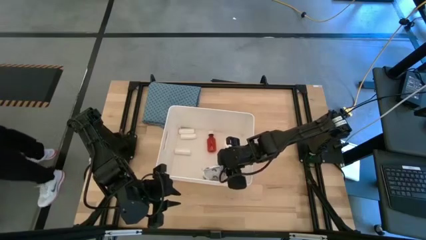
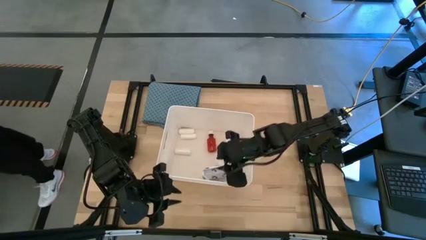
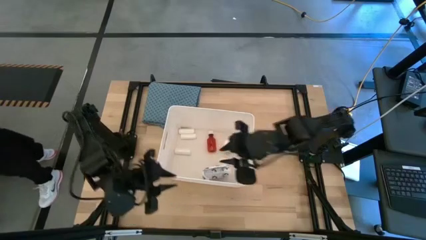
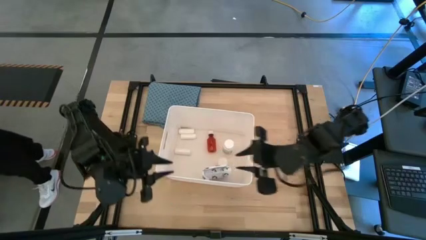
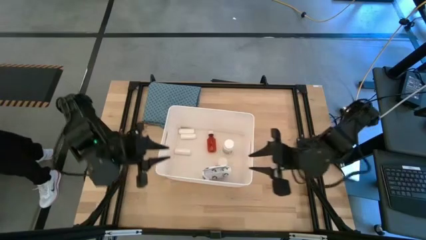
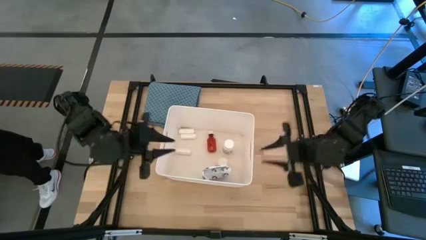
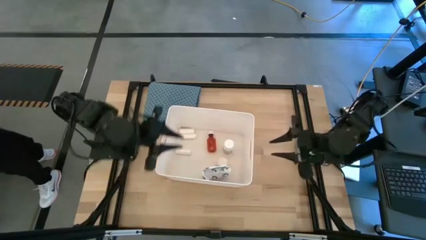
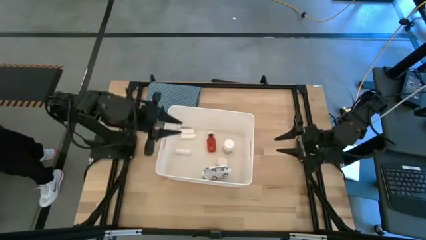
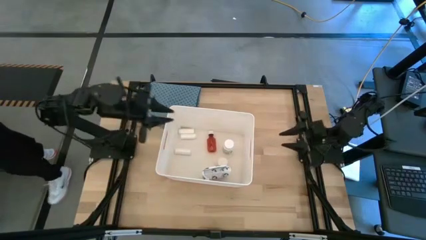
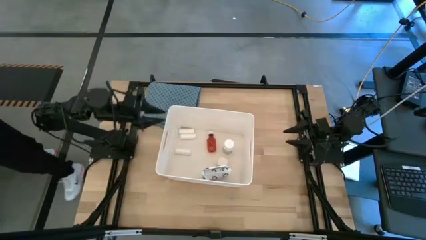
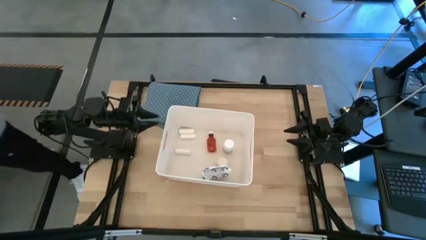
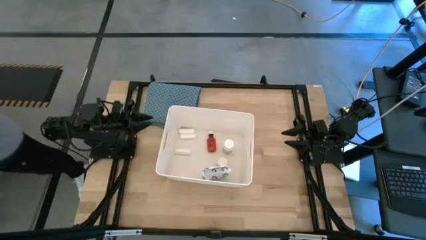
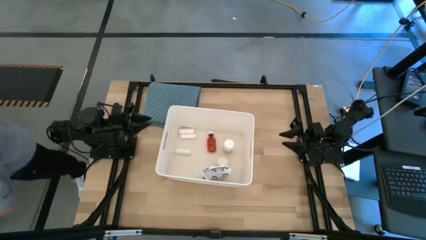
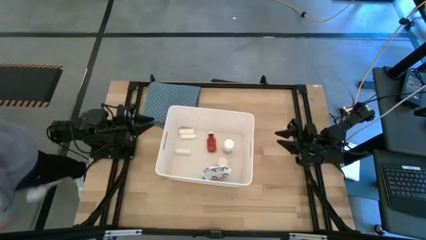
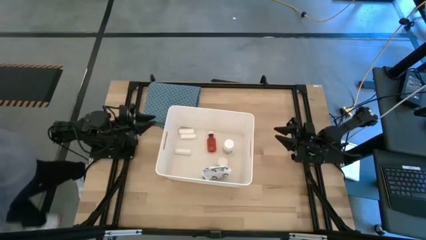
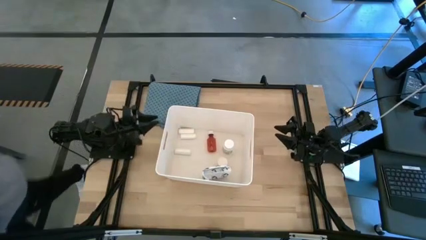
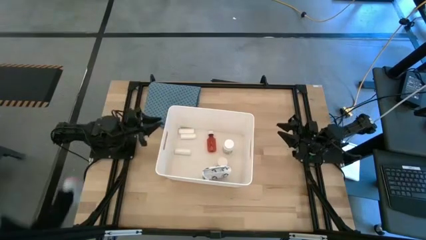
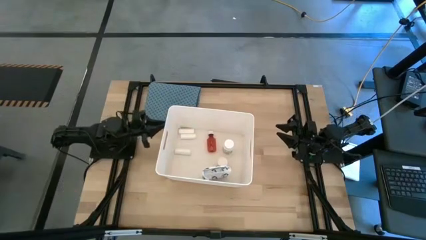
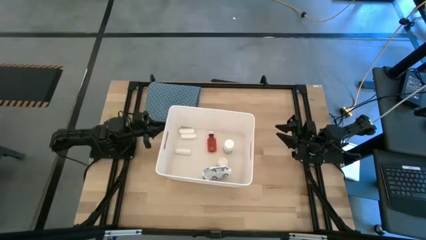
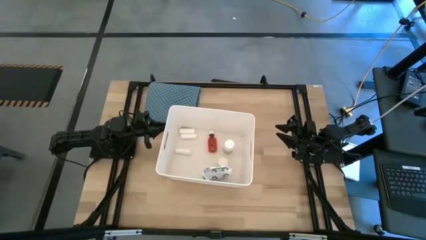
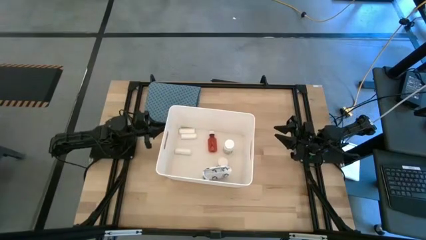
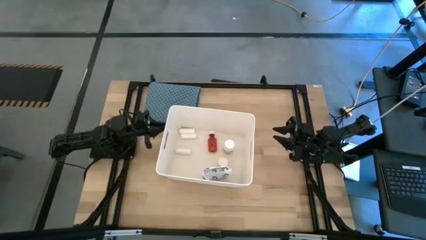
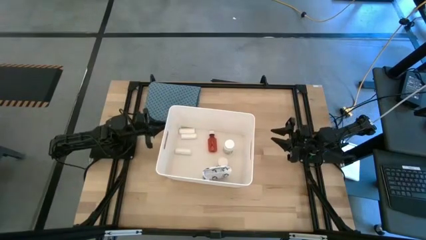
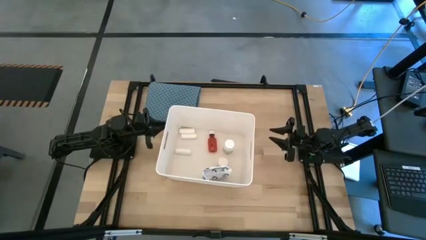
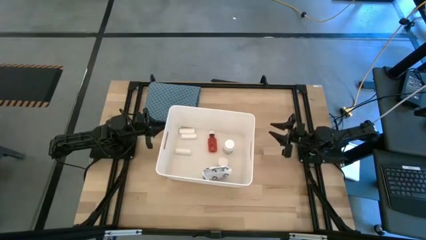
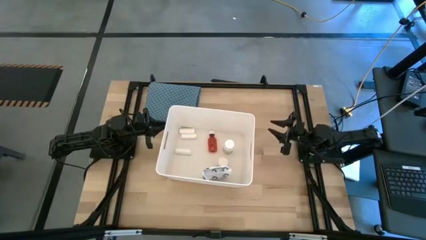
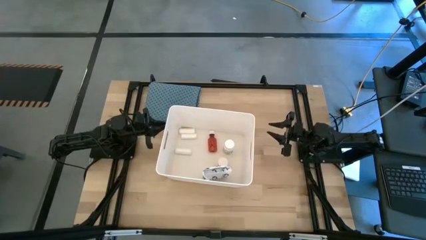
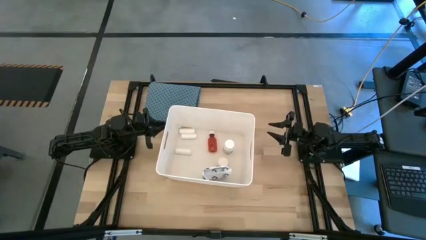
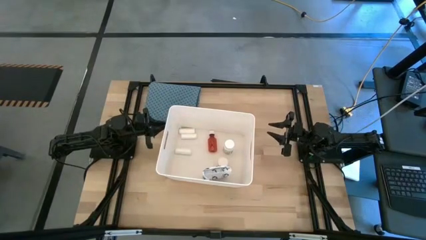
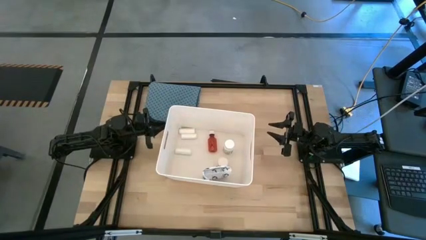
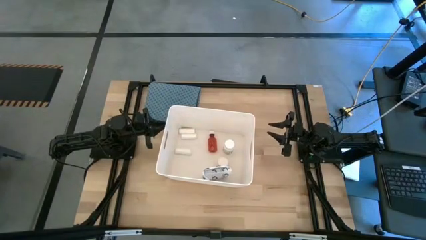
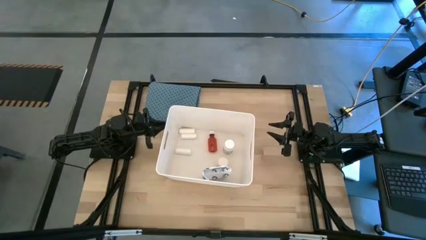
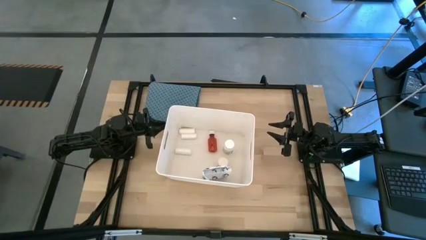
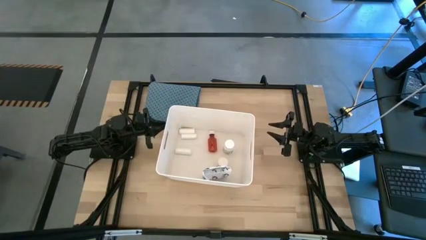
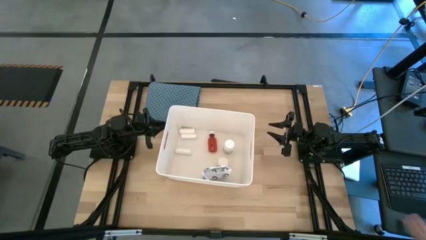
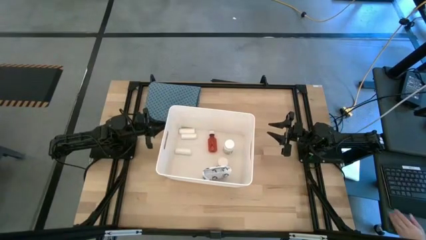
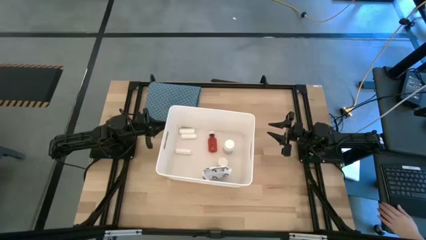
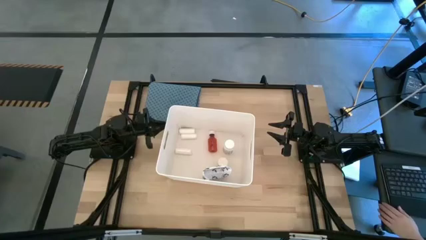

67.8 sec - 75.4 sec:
Task: Pick & place medical supplies in basket/bin
Return to Home Position

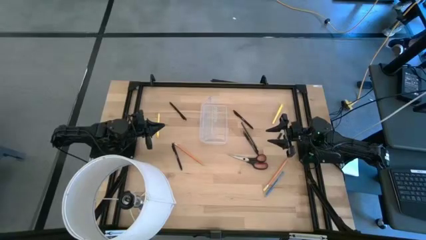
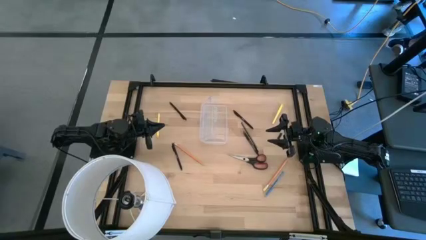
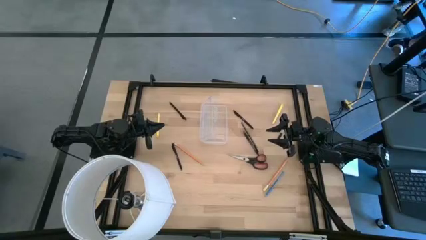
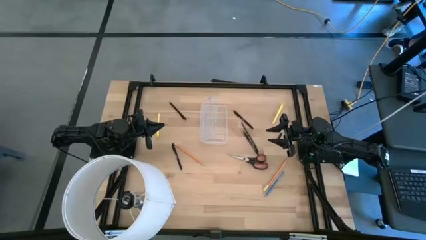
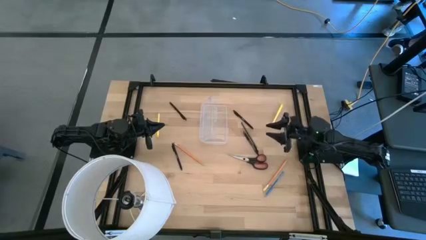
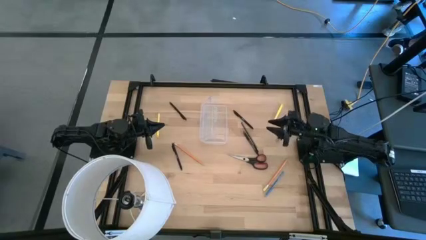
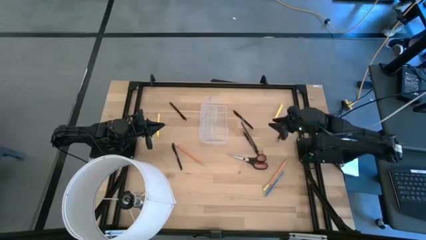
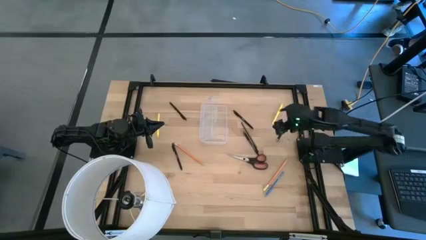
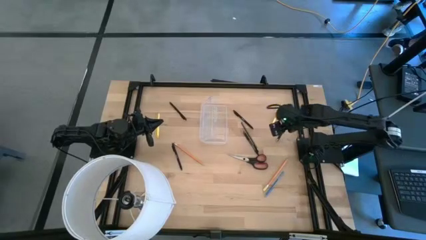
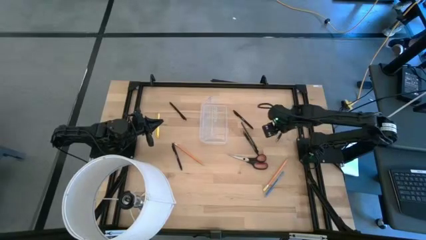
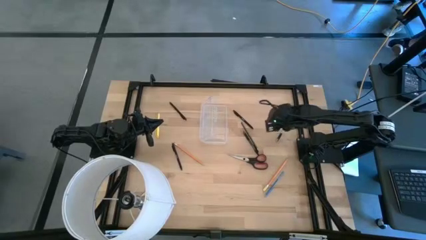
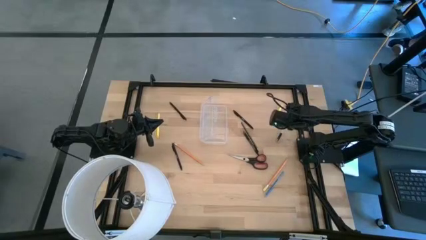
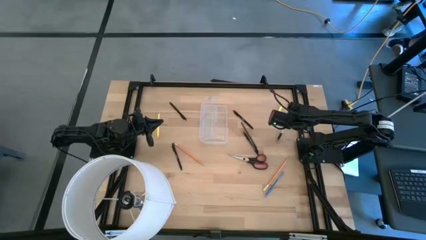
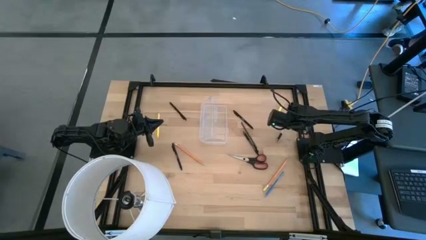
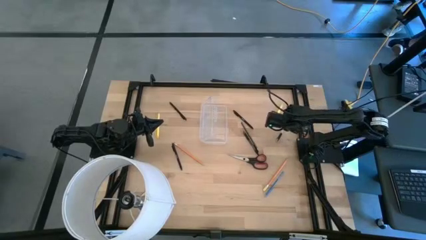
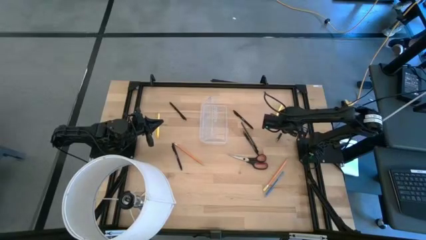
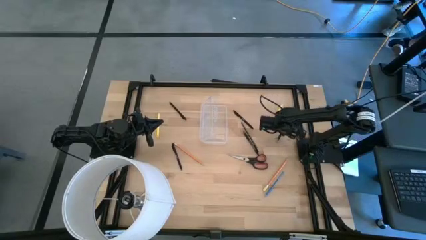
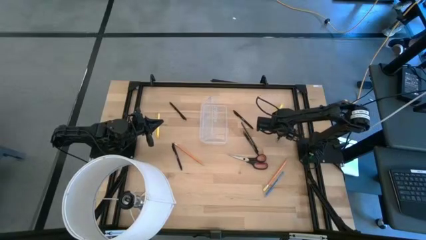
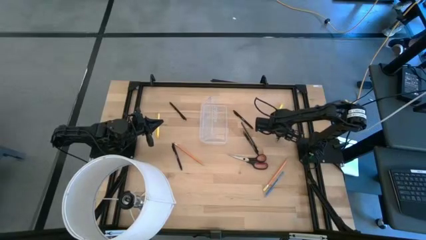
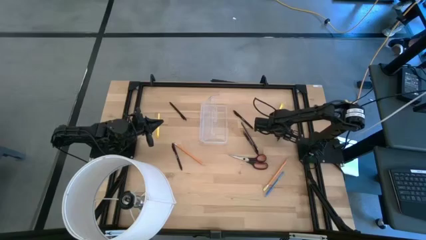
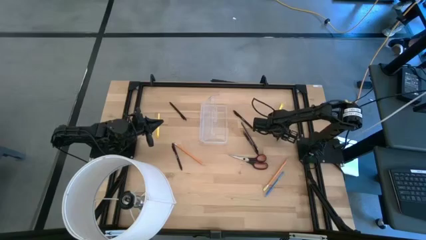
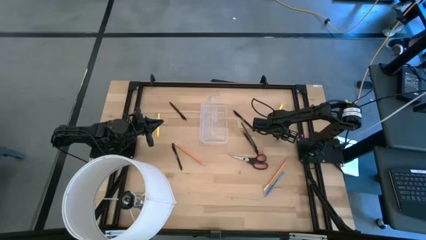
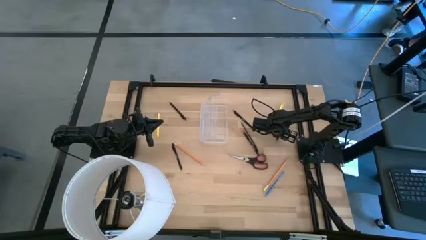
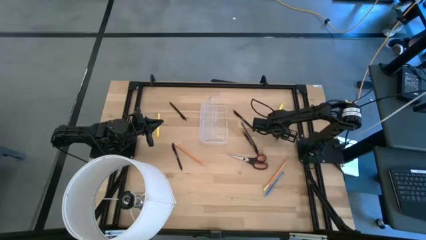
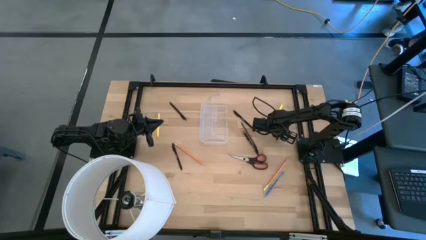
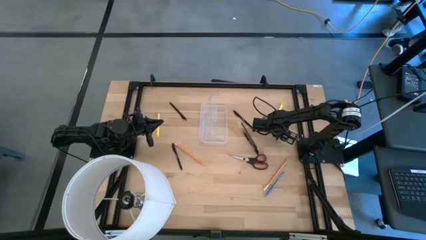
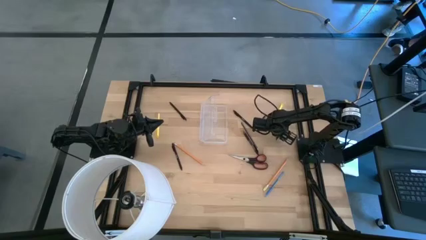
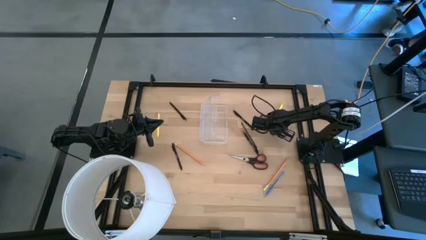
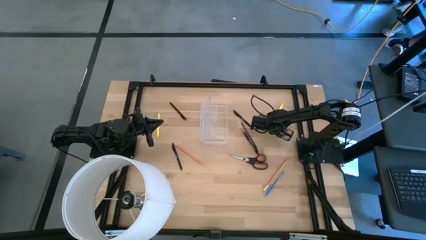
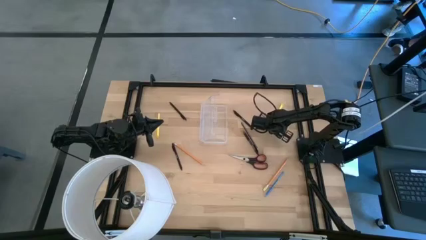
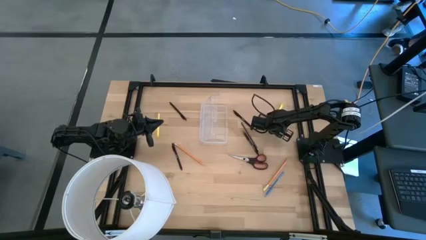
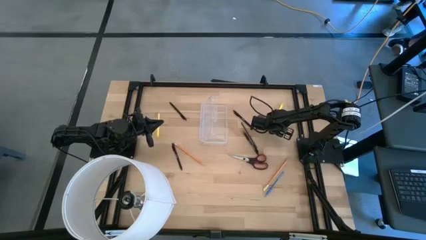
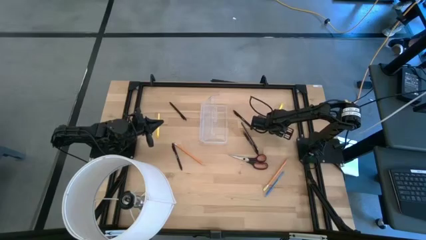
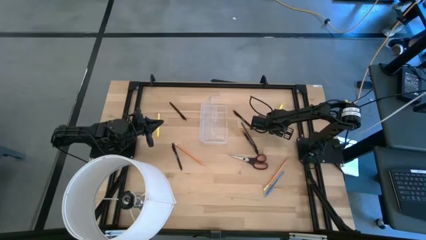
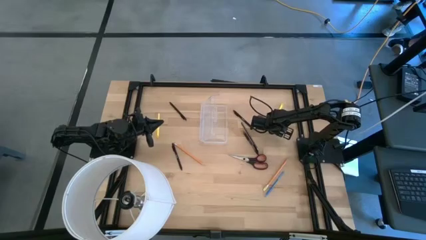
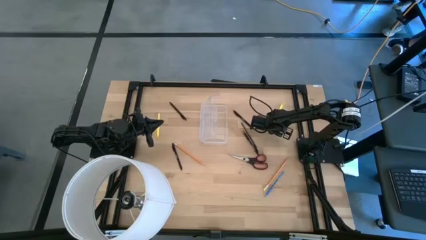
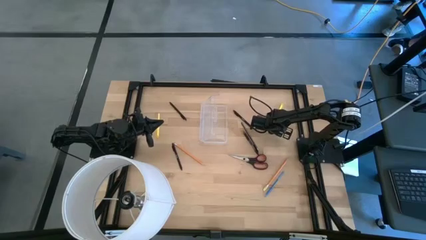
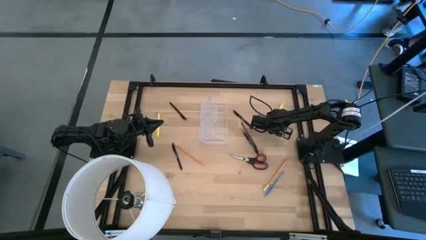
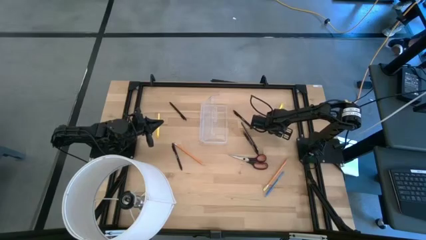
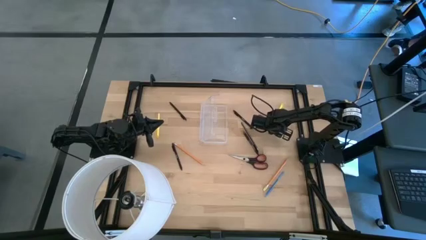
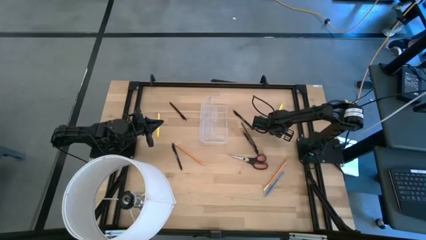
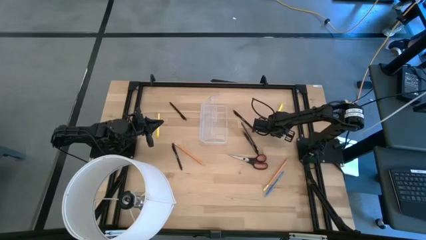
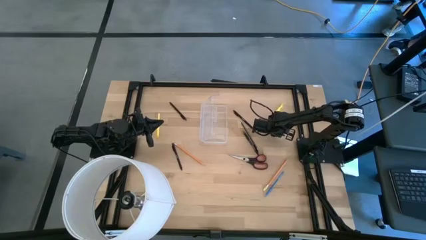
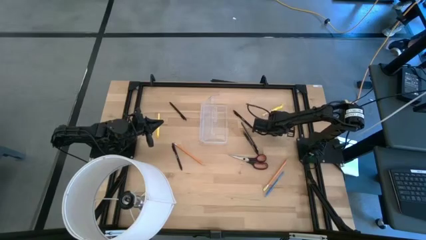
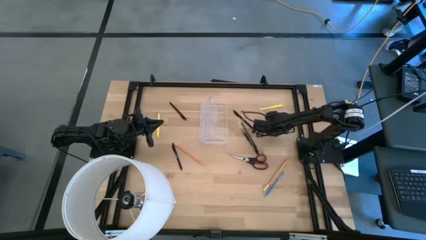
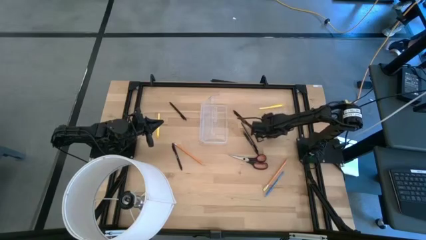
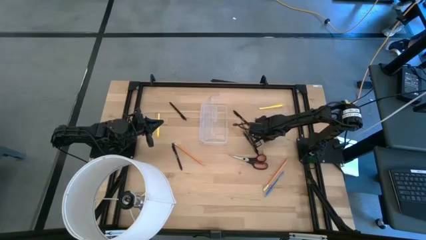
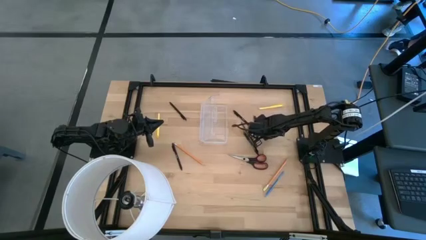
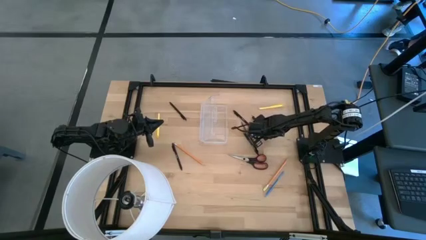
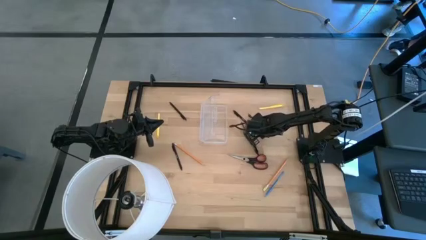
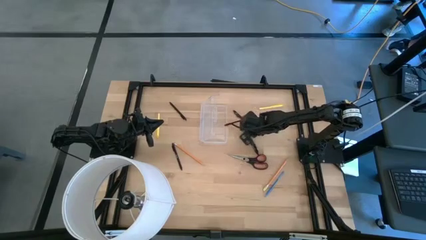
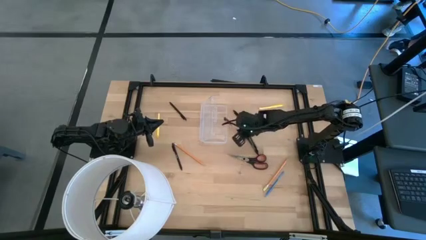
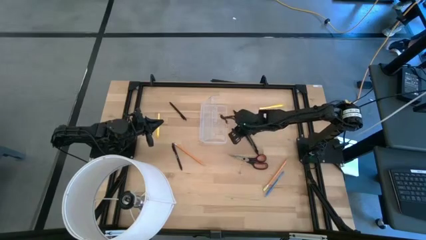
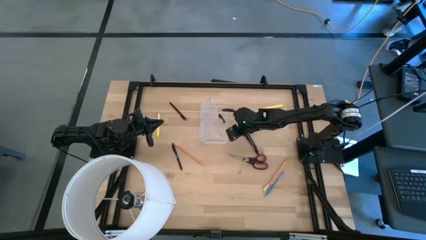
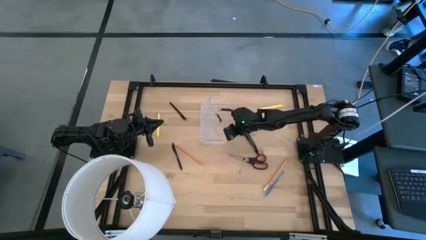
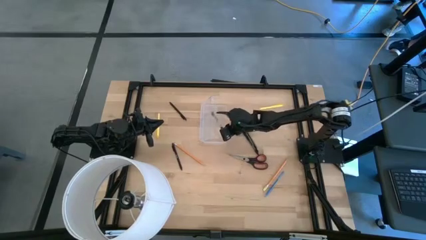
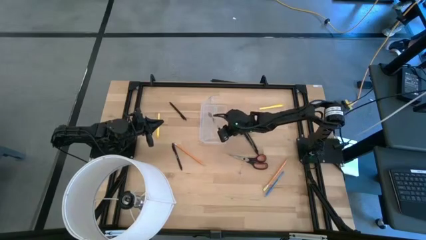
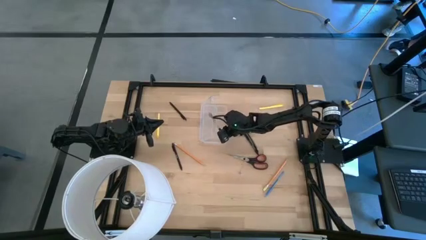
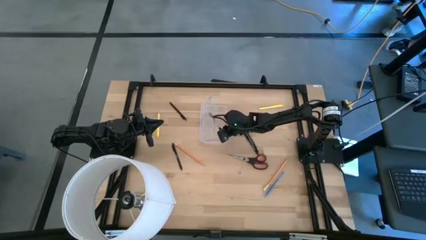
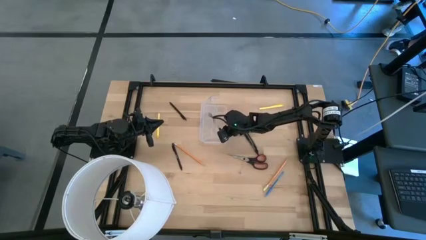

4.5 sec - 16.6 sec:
Task: Pick & place school supplies into a supply box
Put the transparent pen into the transparent supply box
